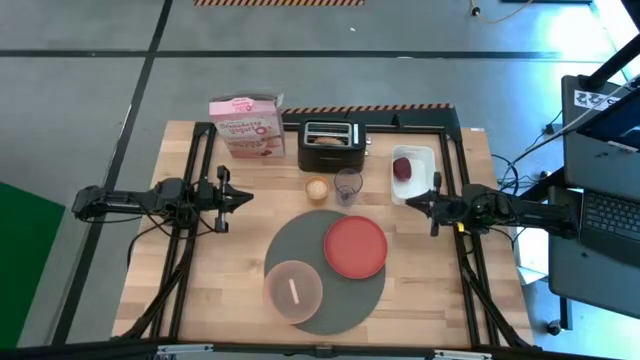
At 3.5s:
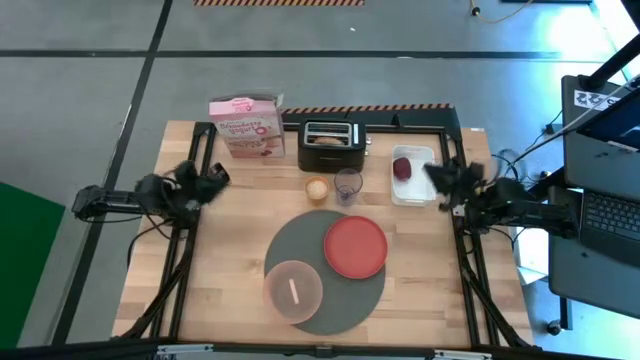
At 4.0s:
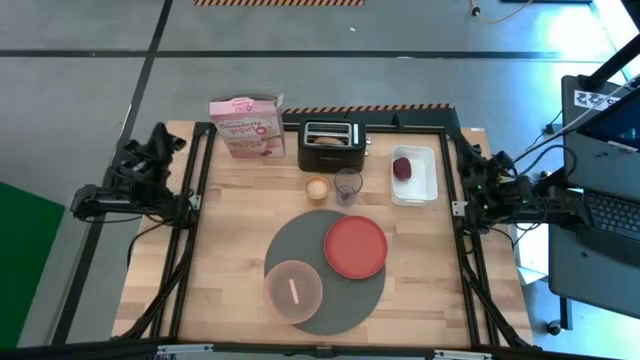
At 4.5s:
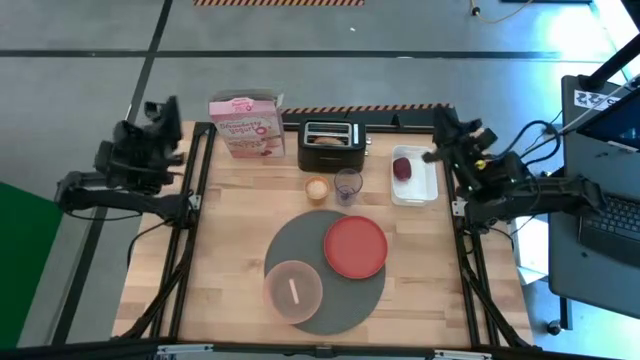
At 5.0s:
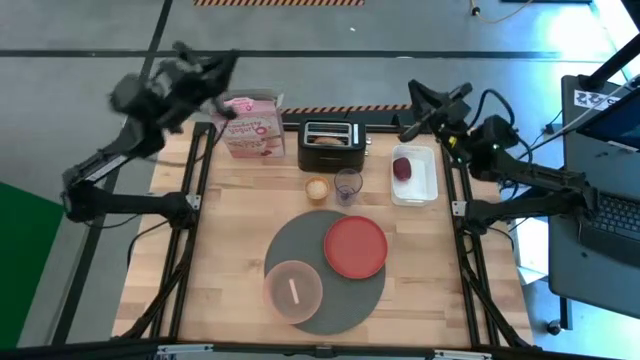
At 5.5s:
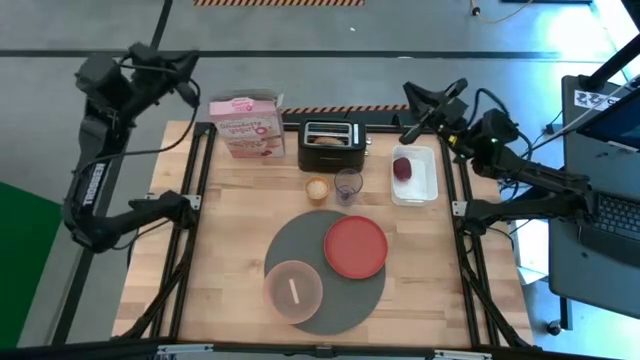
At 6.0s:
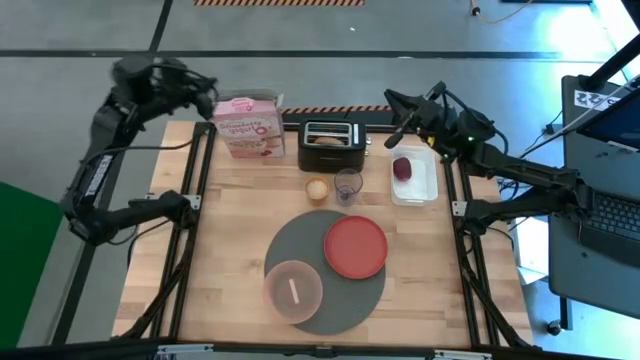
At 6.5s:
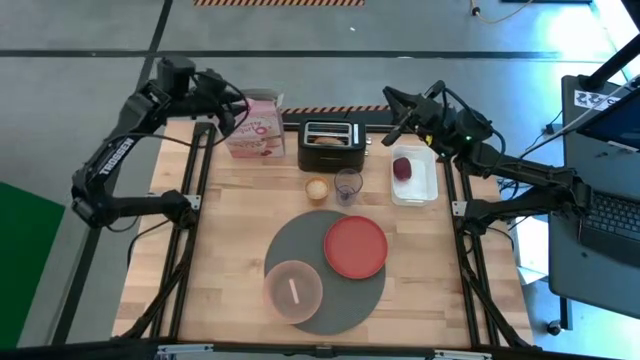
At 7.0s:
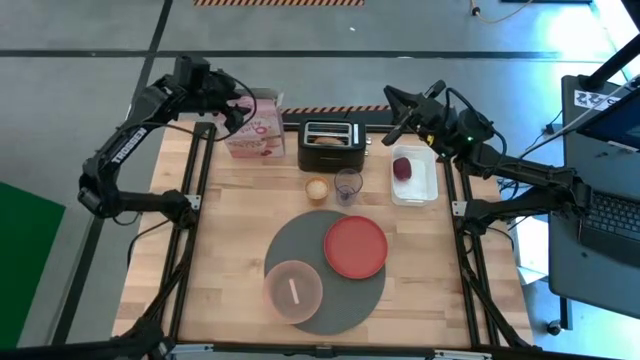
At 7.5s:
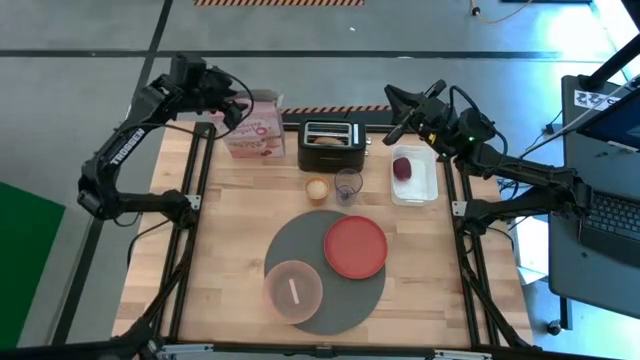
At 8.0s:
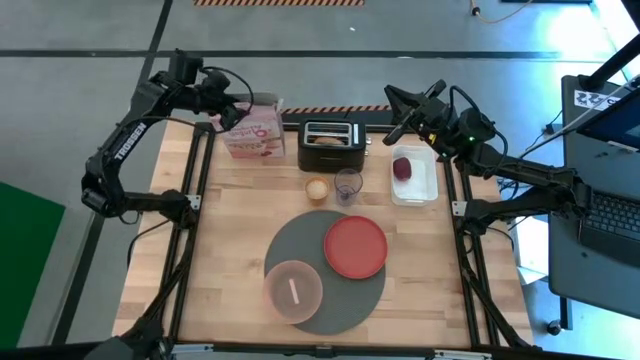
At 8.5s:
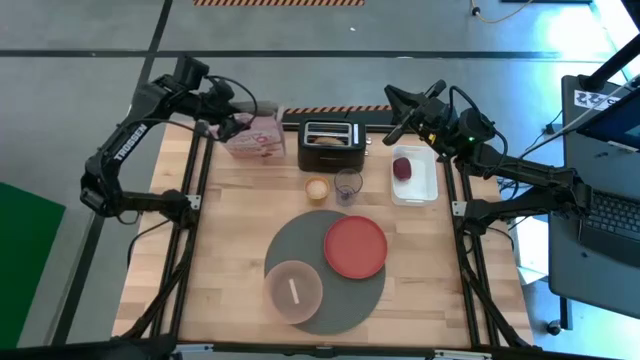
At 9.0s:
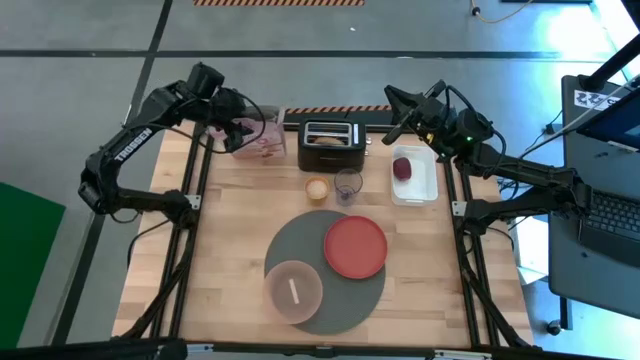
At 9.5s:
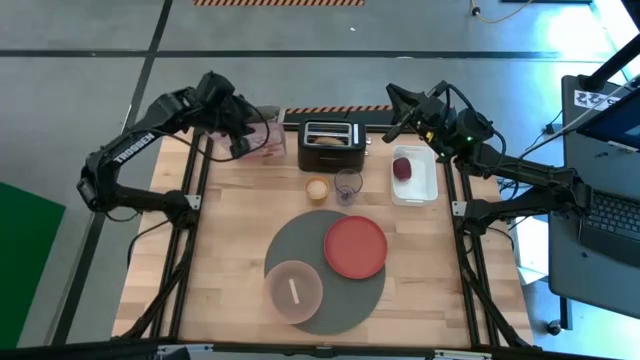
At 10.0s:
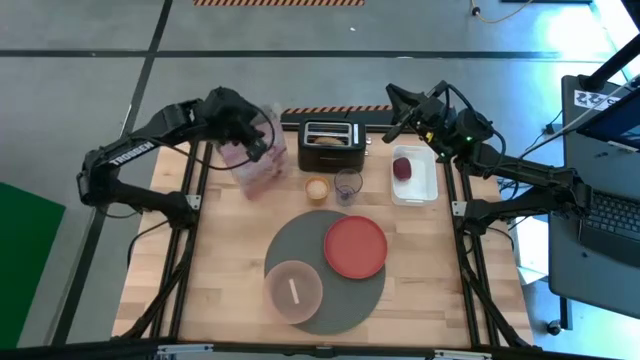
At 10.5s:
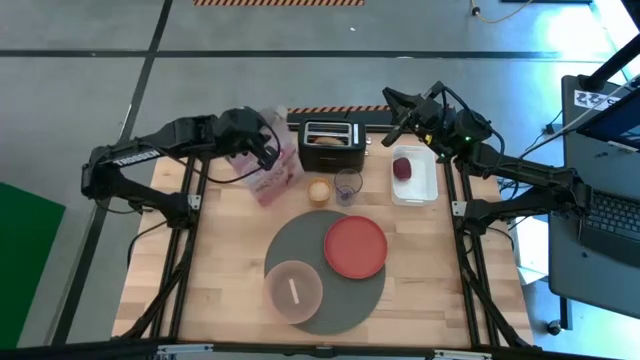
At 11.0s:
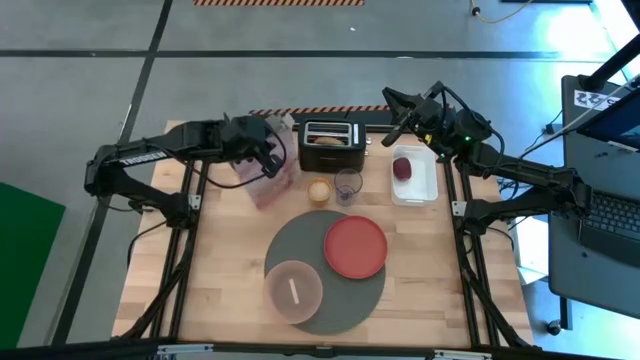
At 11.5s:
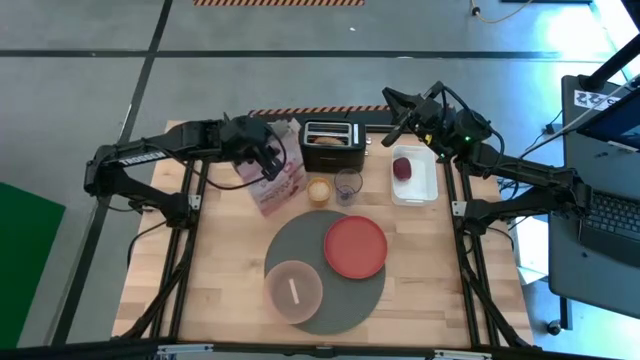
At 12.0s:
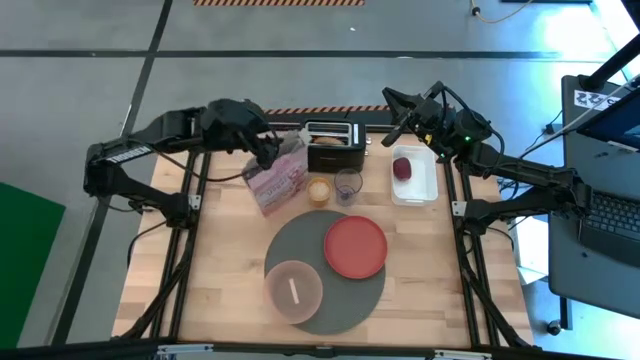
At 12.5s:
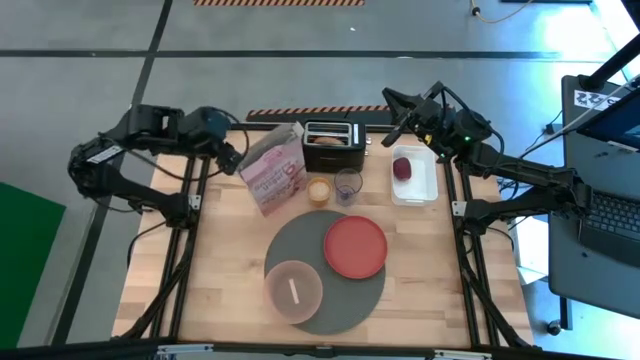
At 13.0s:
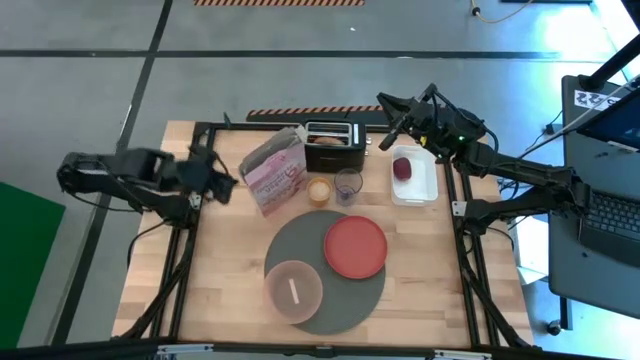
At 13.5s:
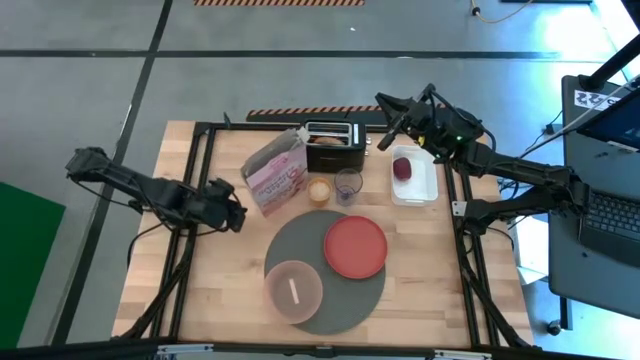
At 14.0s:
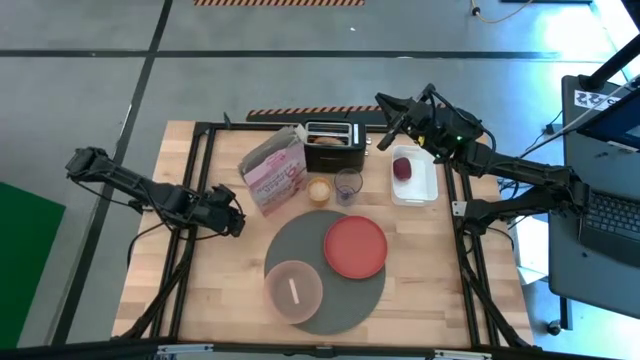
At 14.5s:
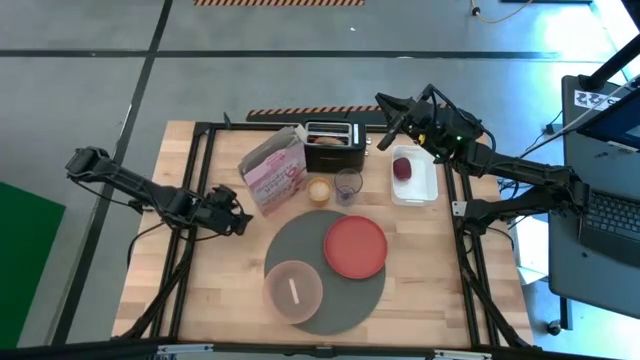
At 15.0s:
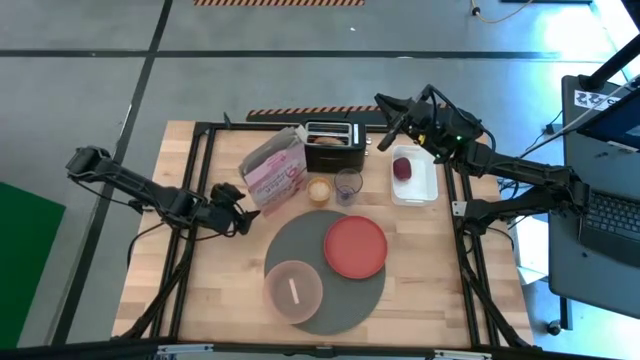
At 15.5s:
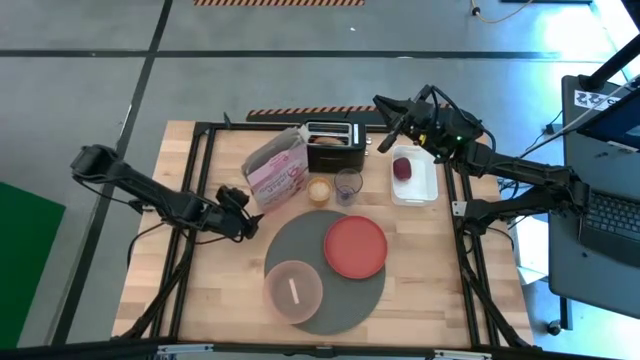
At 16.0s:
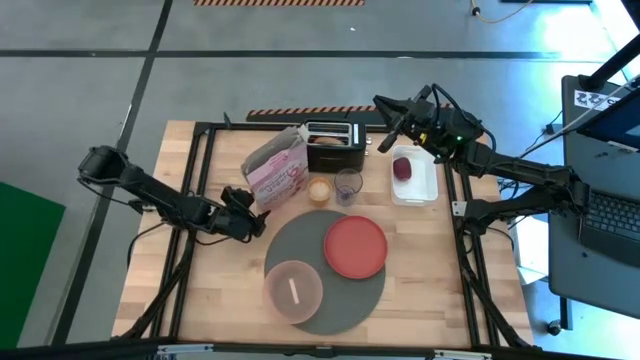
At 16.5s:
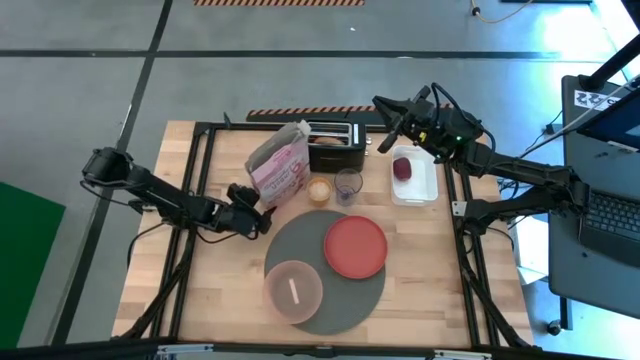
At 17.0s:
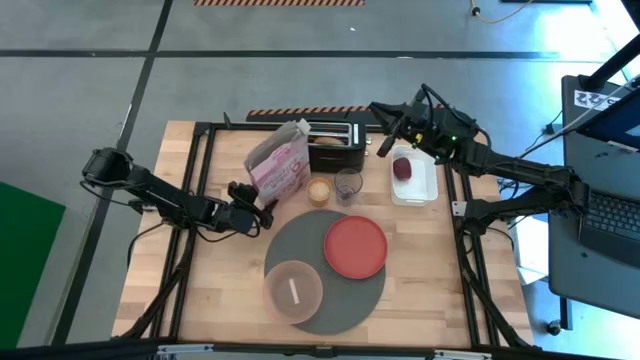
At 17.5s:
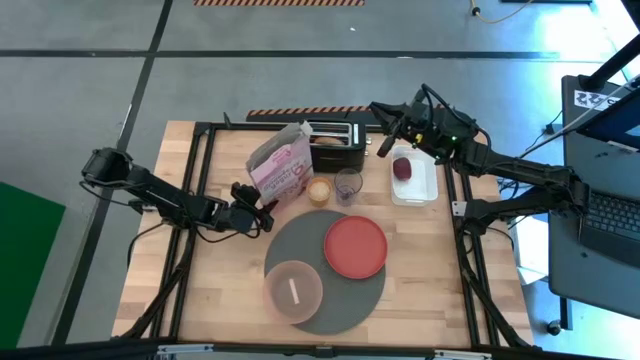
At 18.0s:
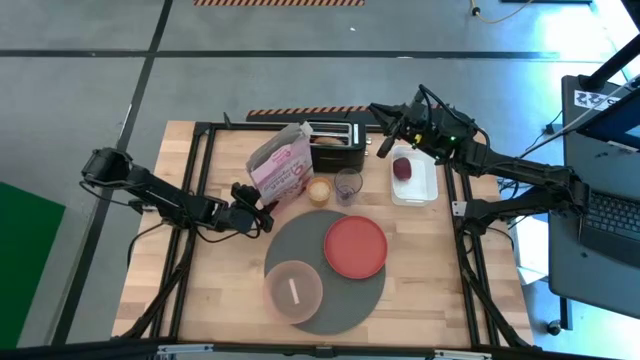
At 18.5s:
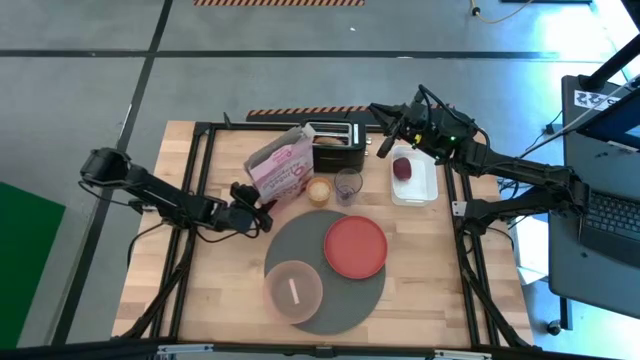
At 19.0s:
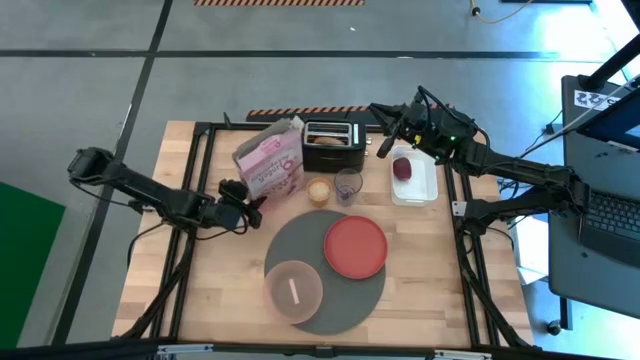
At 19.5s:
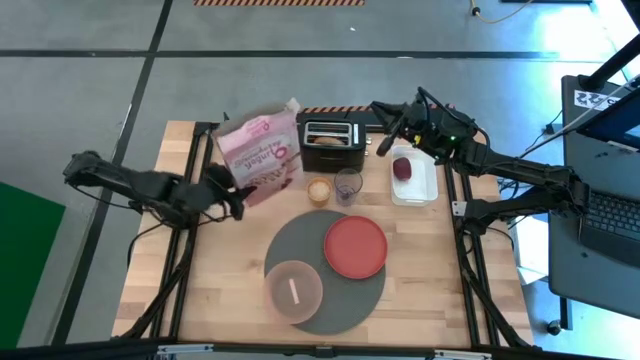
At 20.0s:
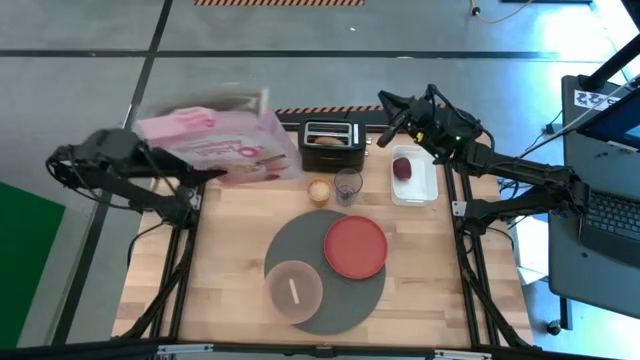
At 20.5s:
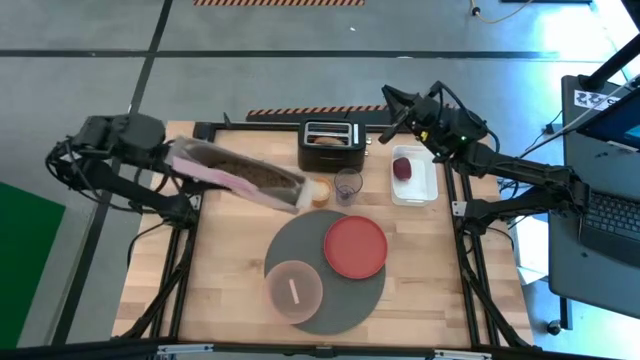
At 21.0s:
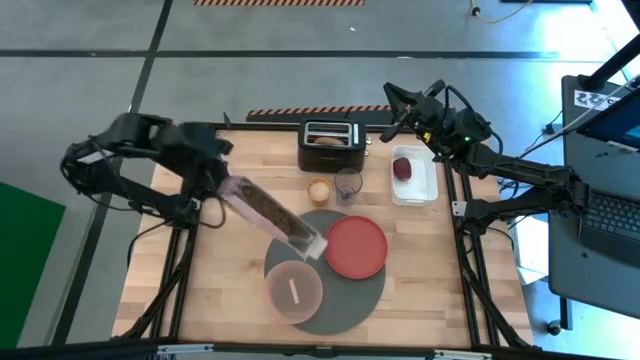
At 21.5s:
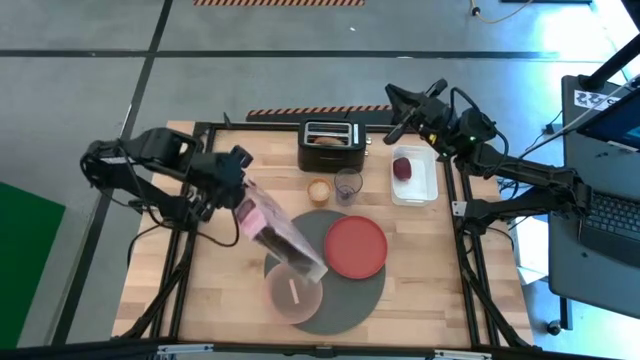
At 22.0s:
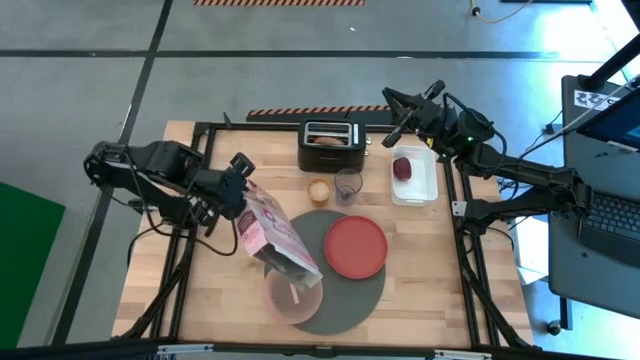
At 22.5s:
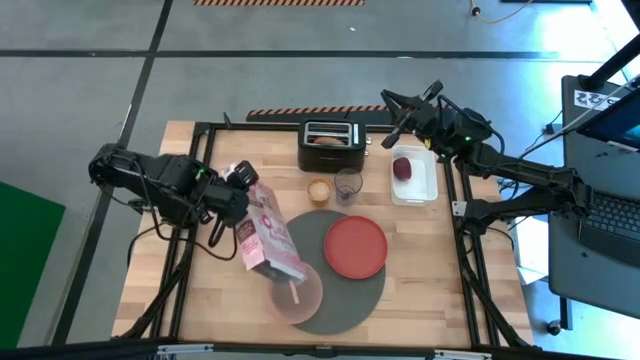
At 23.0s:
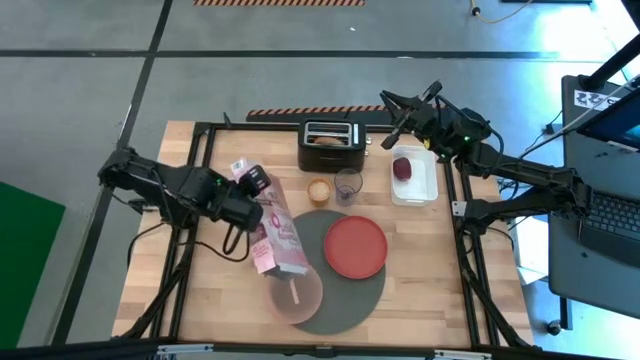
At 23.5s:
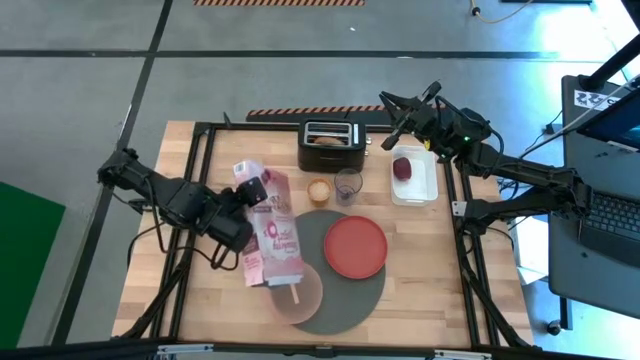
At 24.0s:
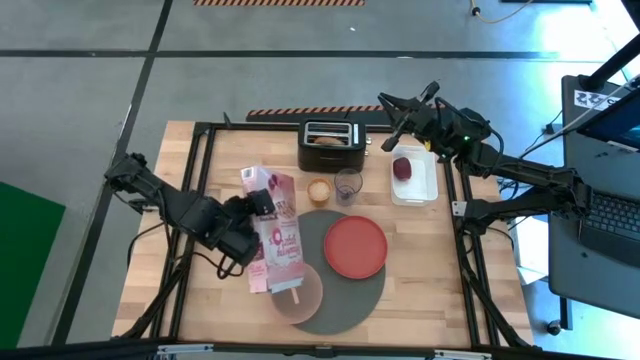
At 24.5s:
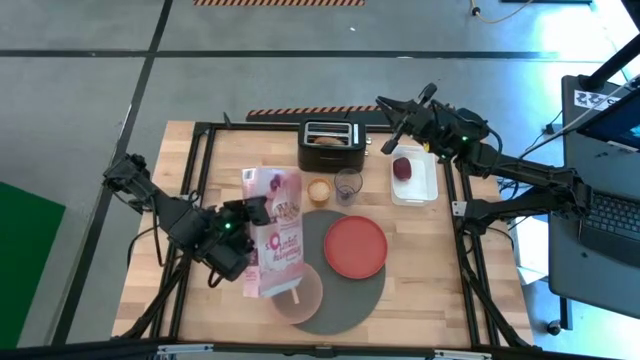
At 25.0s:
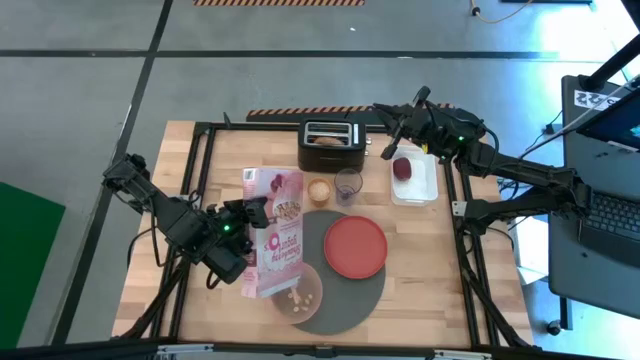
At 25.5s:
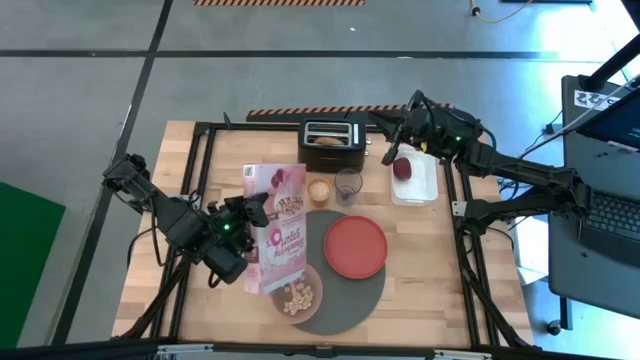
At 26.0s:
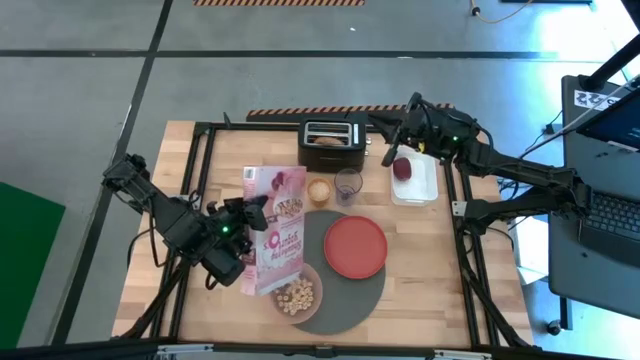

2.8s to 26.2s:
Task: Arrange a breakfast setting
Pour the cereal from the cereal box into the light pink bowl
